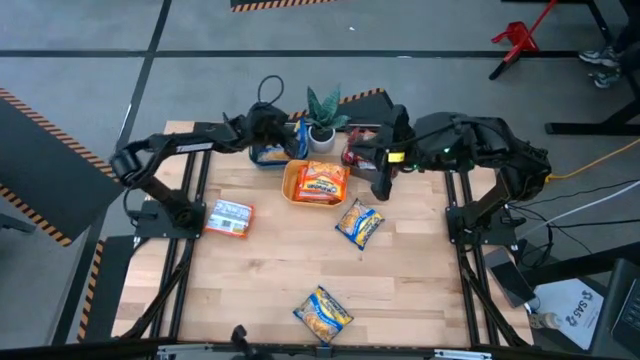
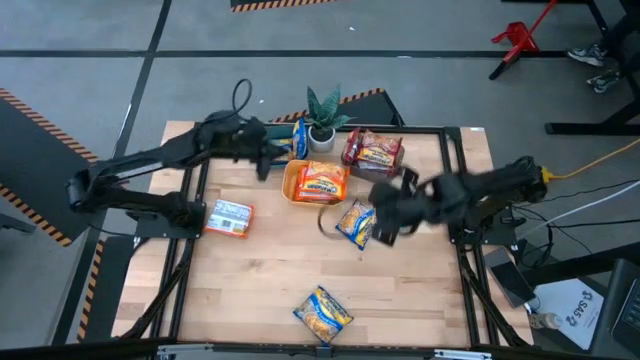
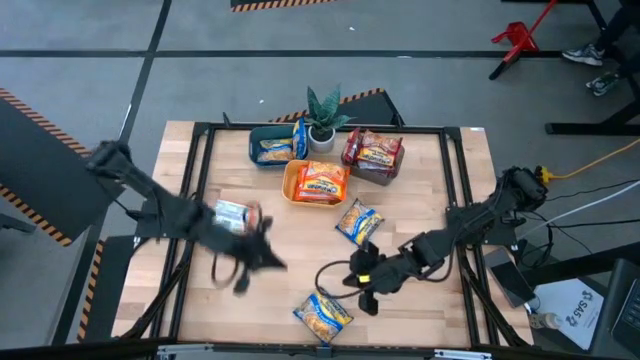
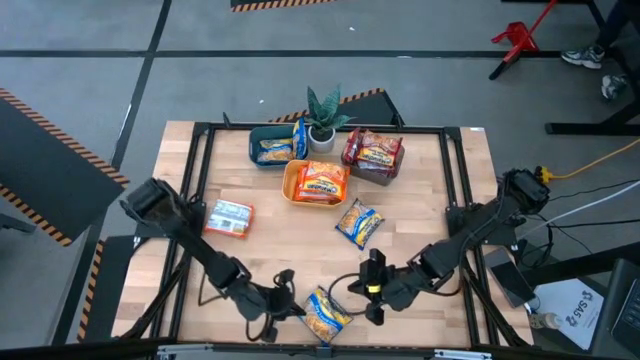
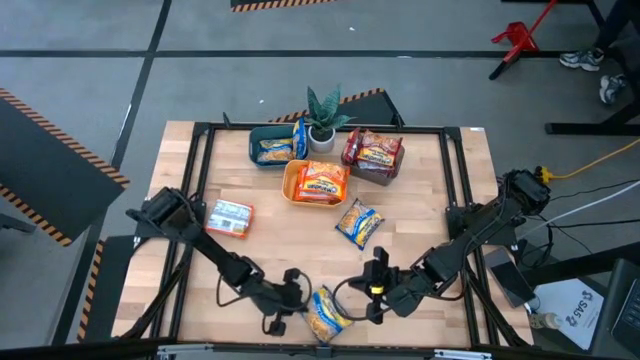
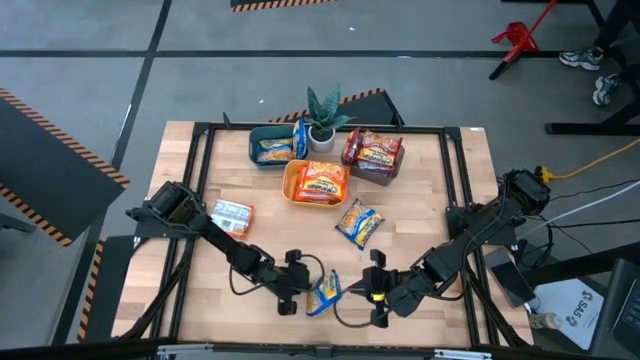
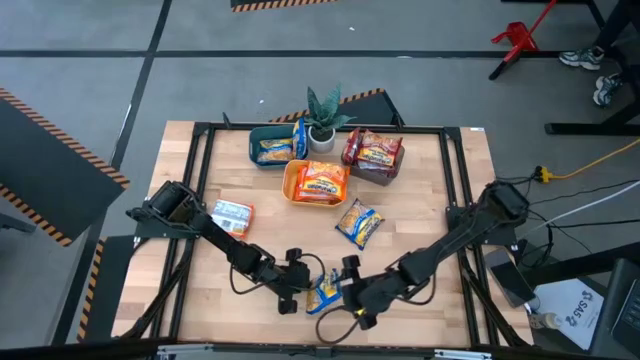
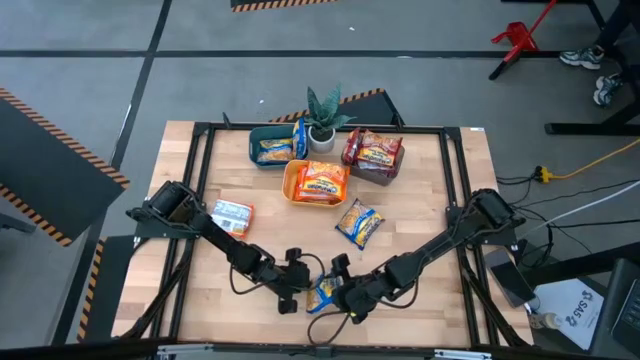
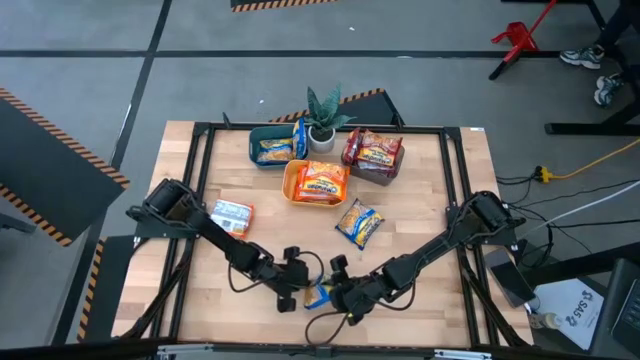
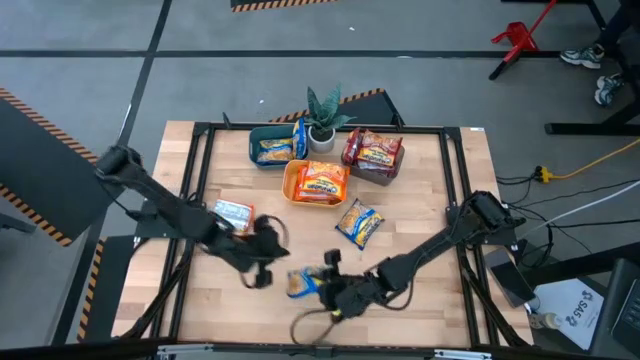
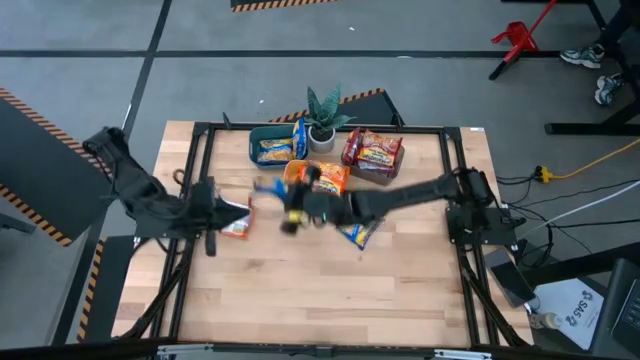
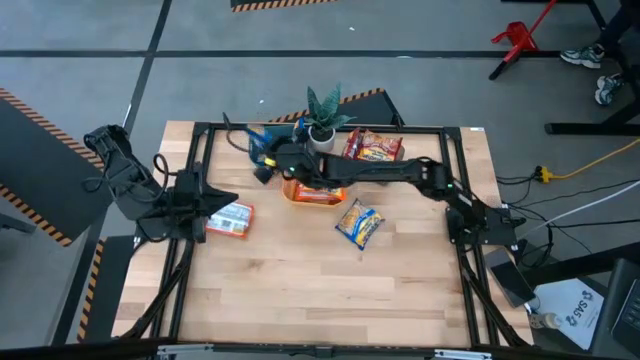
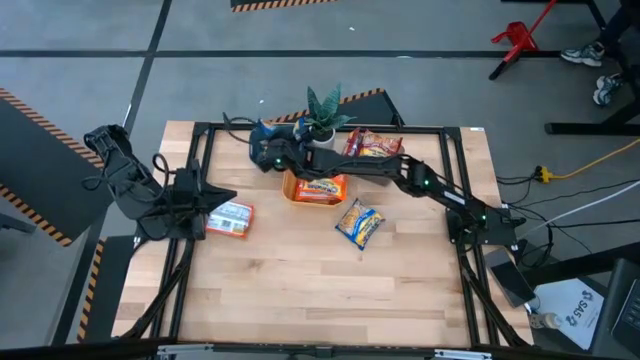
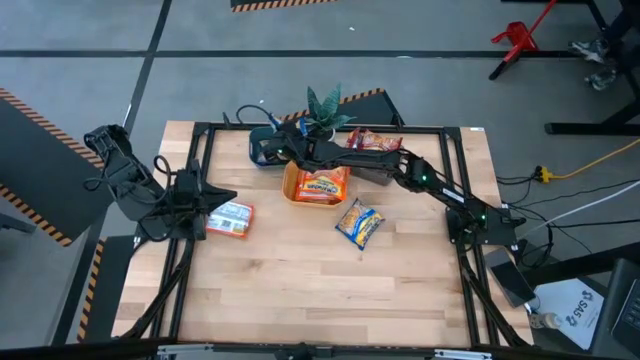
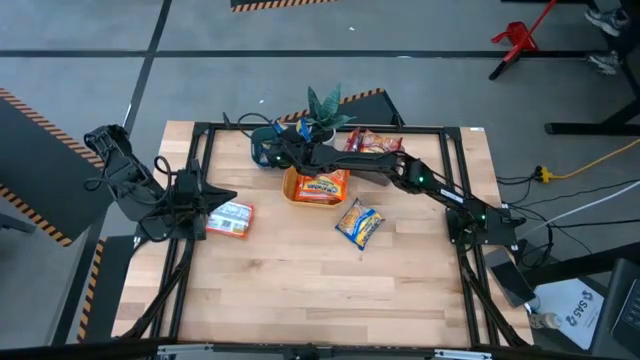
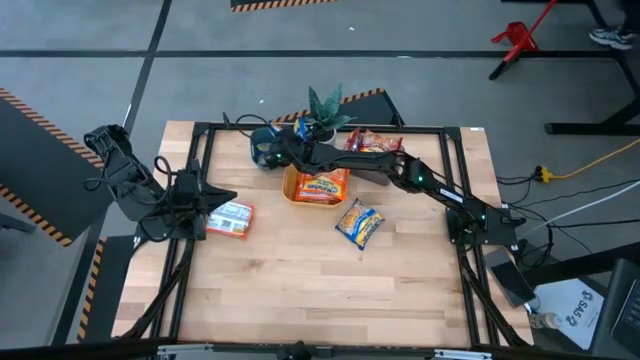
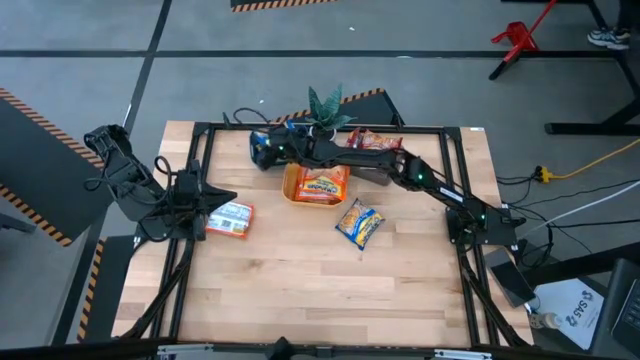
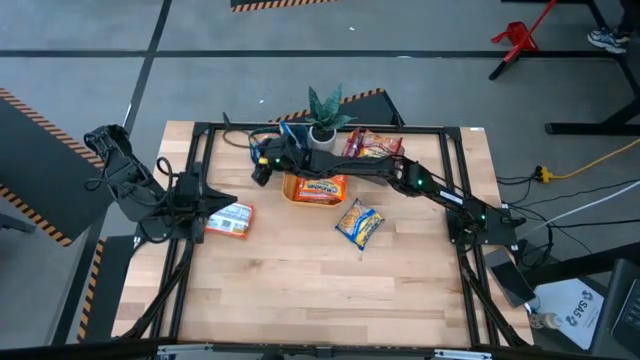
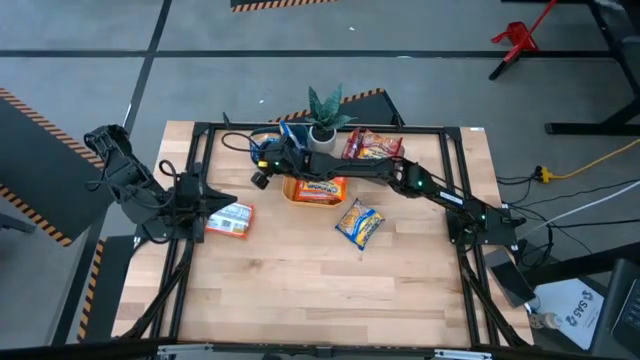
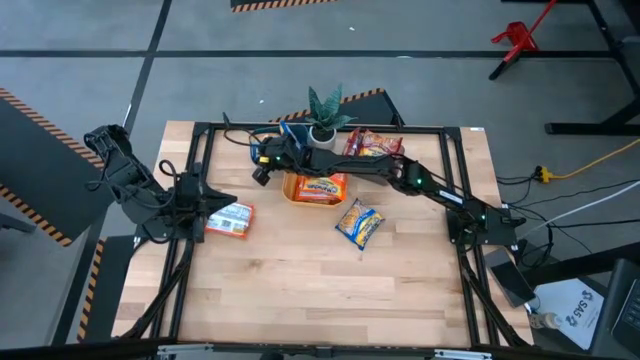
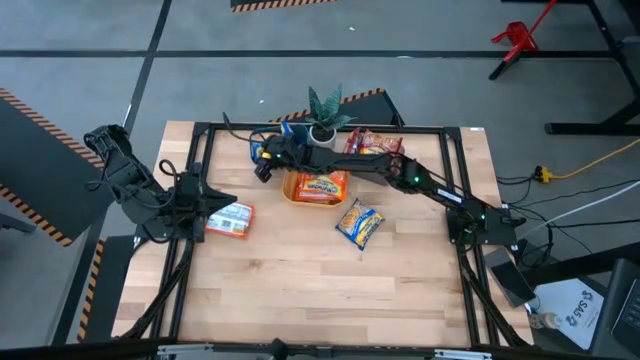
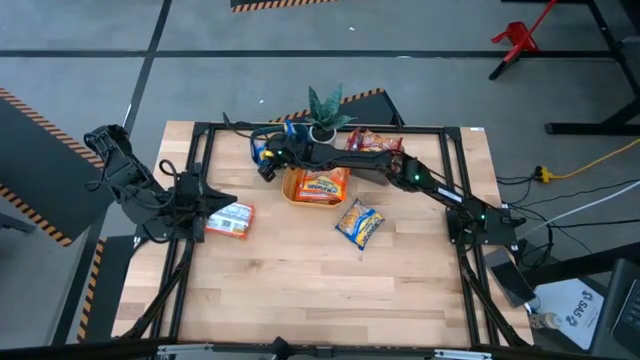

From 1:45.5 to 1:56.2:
Task: Sort Maruchan noodles
Put the bottom blue noodle pack into the blue bin

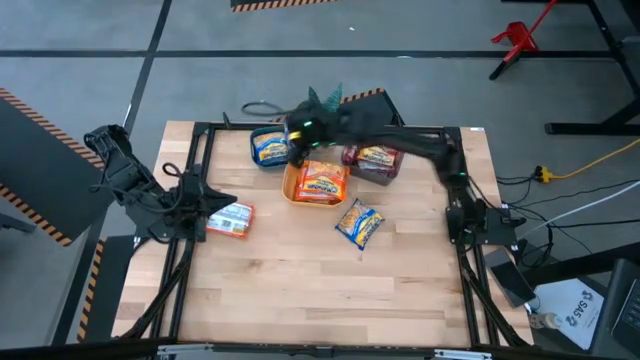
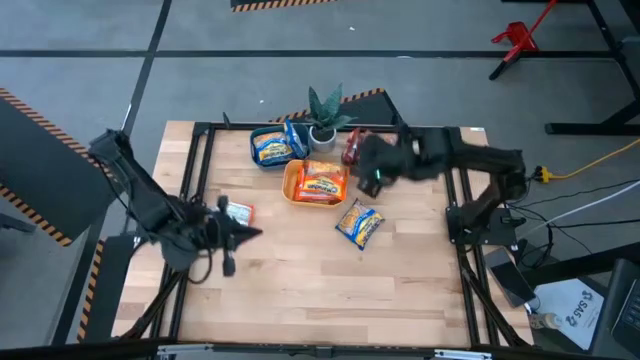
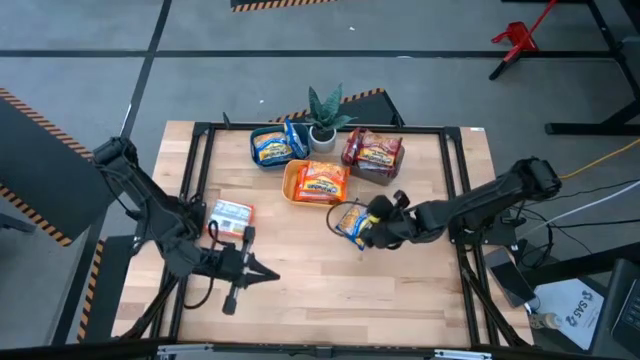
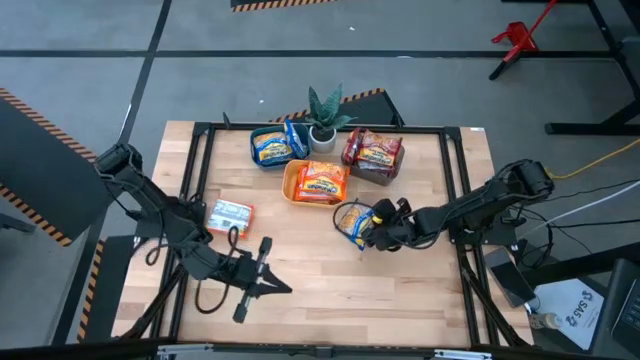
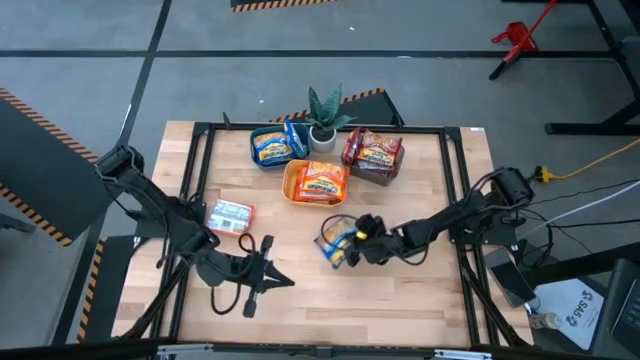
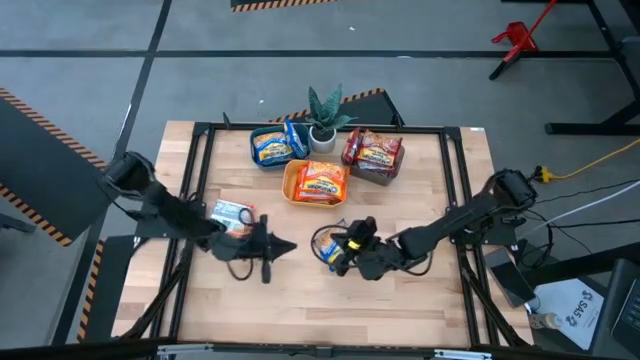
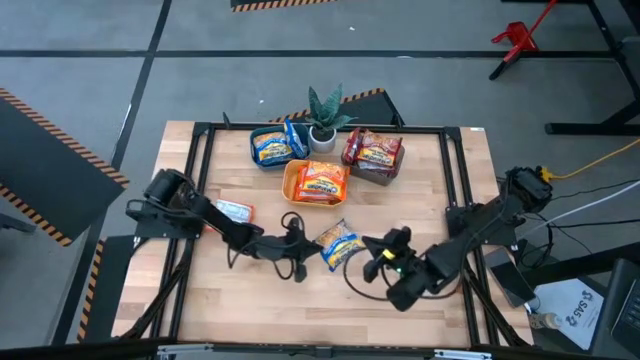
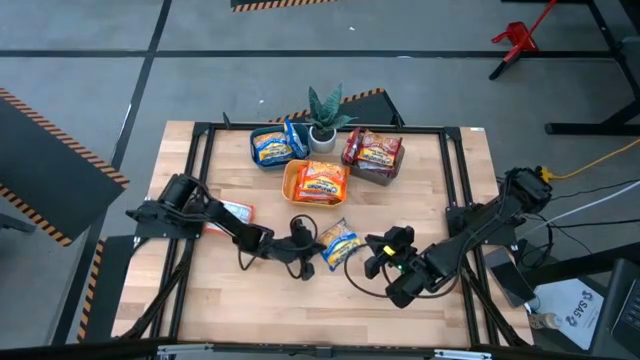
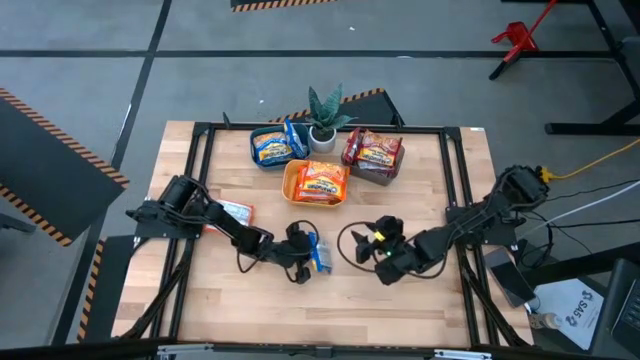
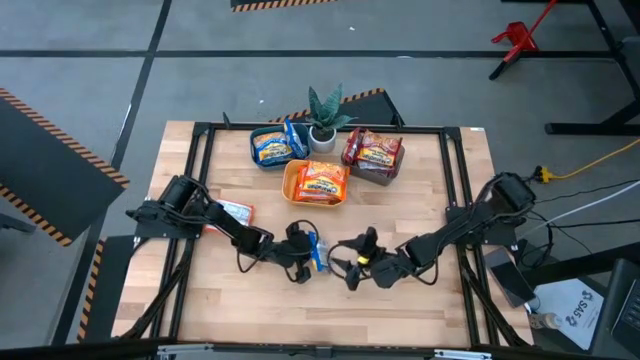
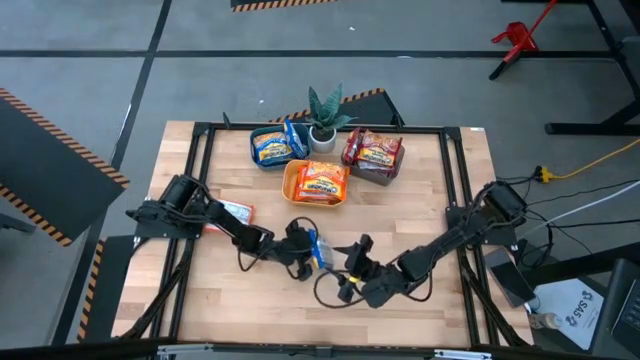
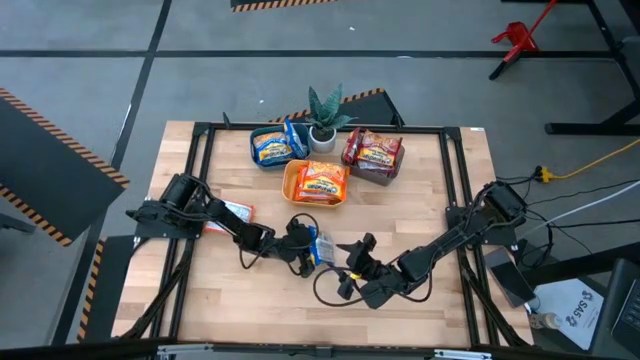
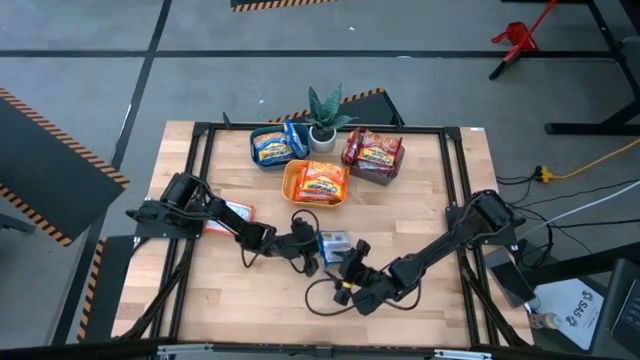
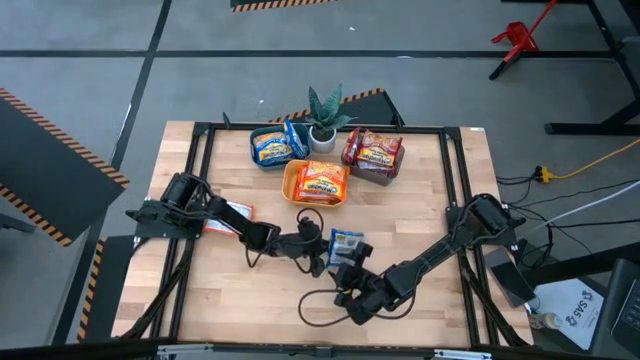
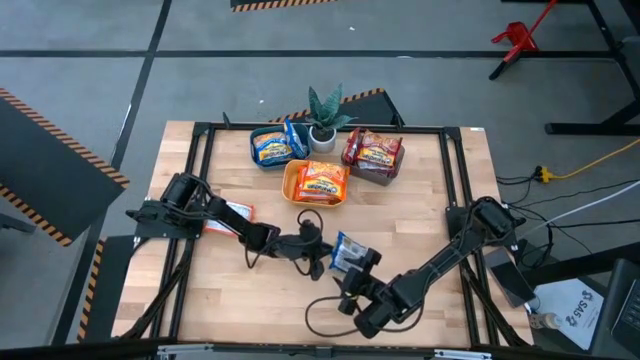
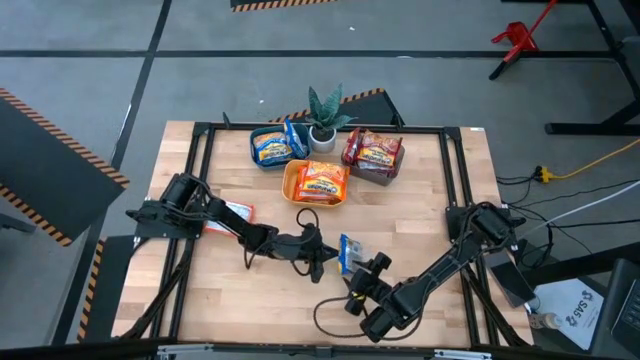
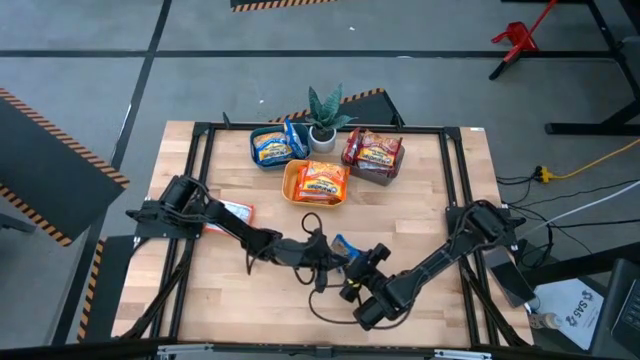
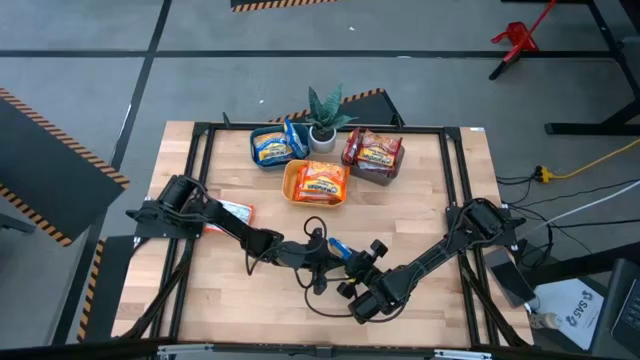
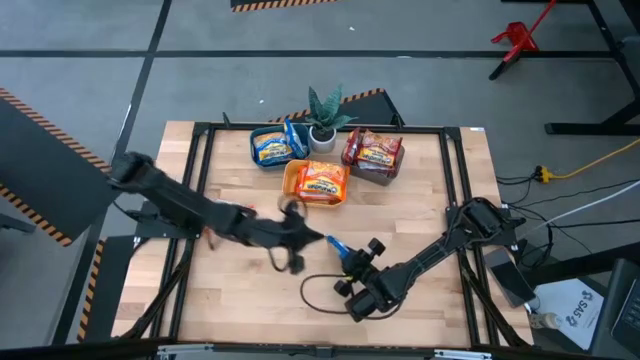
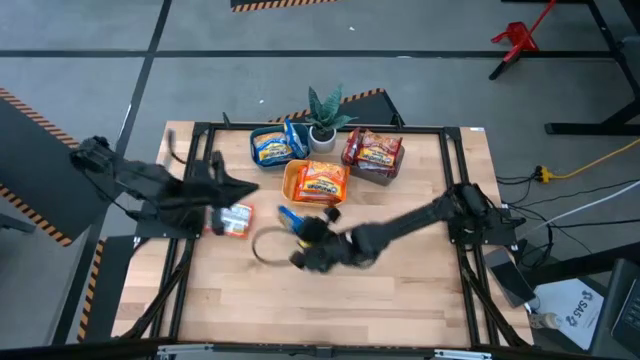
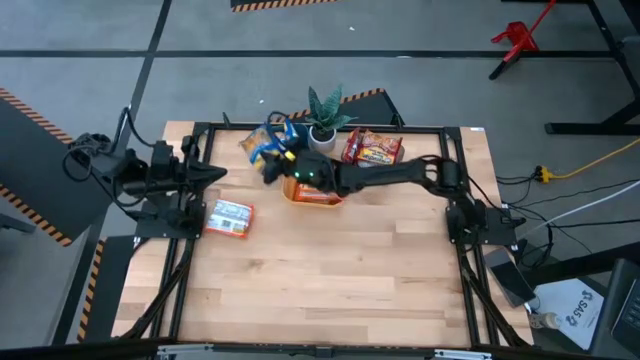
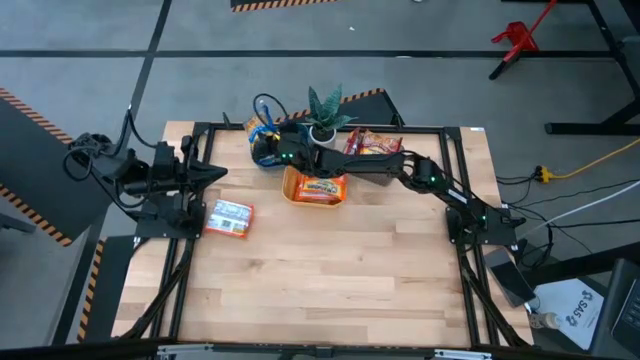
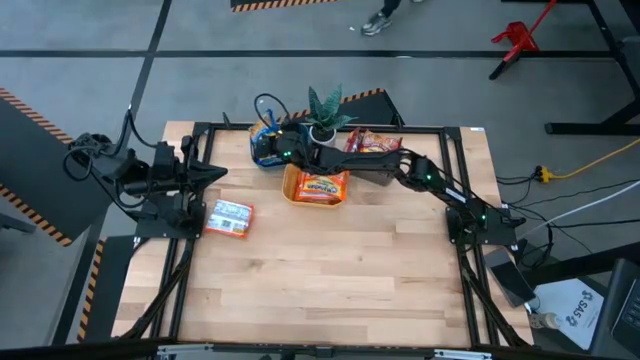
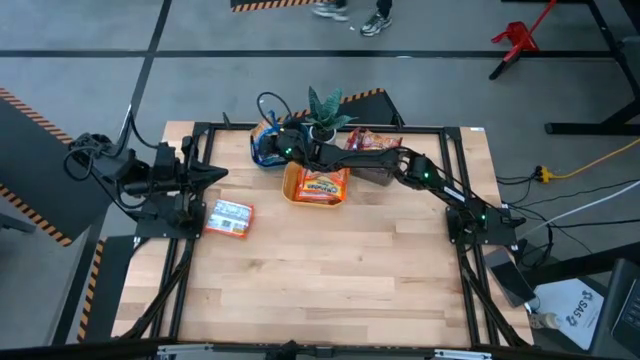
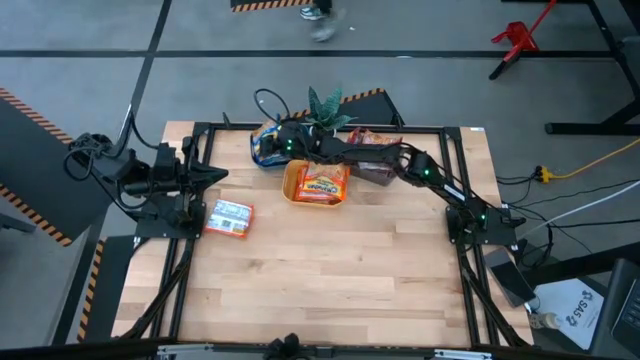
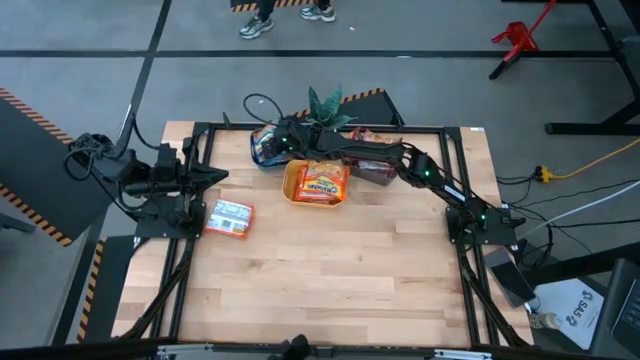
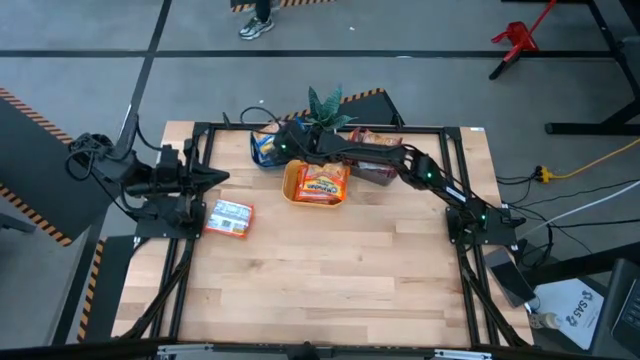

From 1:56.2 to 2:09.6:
Put the blue noodle pack into the blue bin
